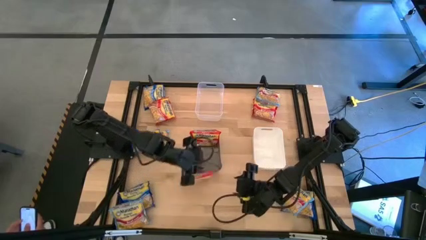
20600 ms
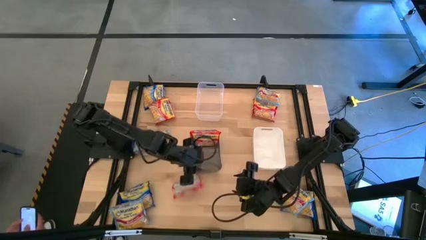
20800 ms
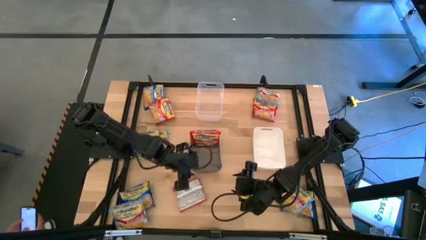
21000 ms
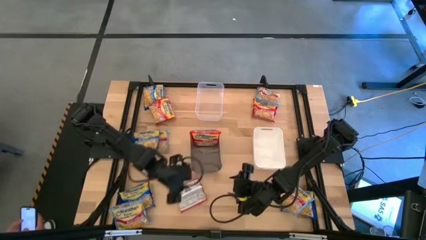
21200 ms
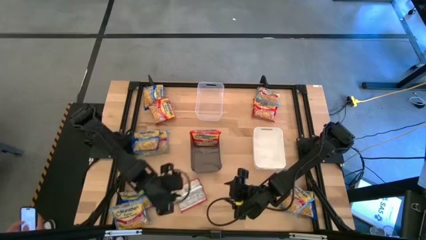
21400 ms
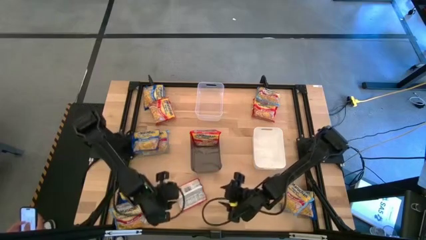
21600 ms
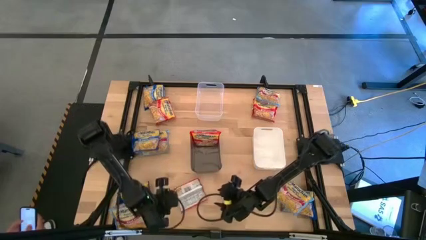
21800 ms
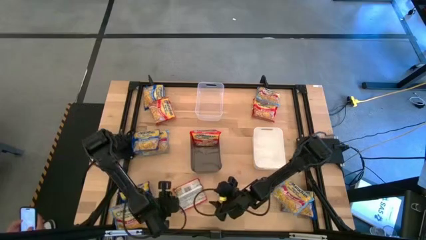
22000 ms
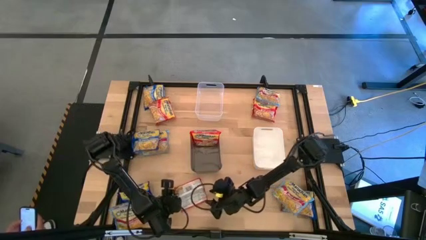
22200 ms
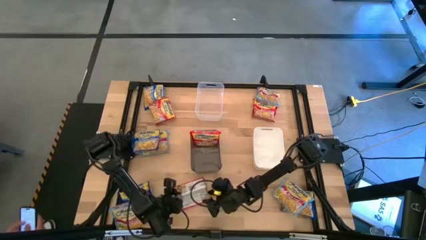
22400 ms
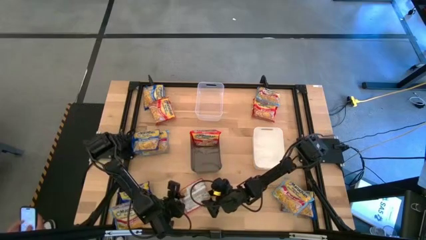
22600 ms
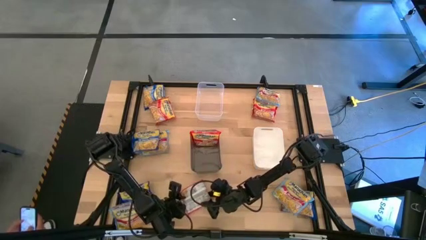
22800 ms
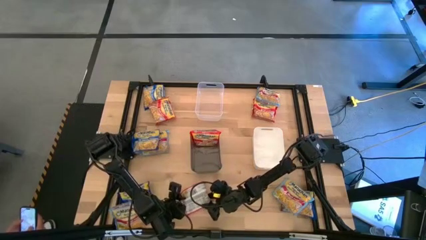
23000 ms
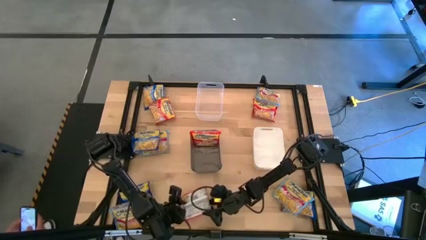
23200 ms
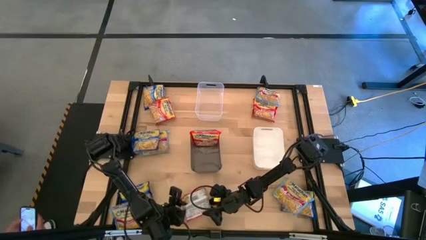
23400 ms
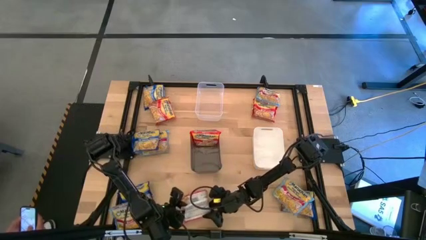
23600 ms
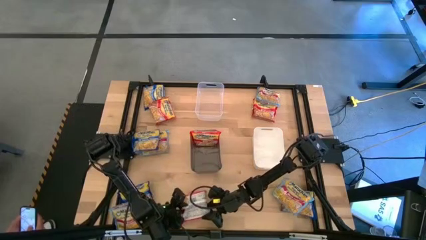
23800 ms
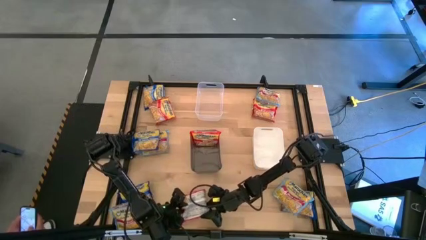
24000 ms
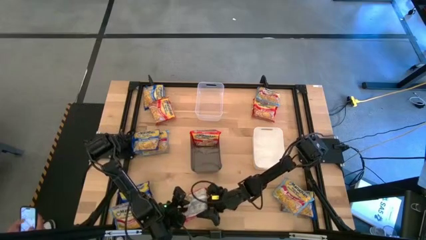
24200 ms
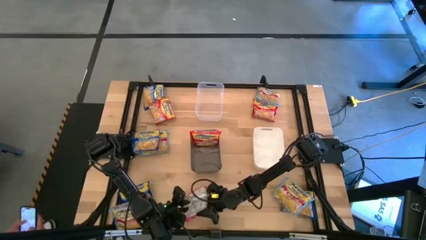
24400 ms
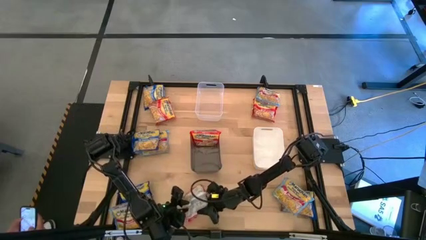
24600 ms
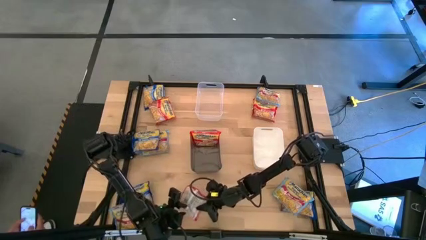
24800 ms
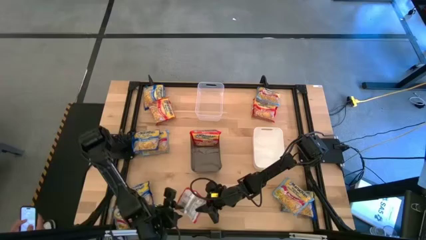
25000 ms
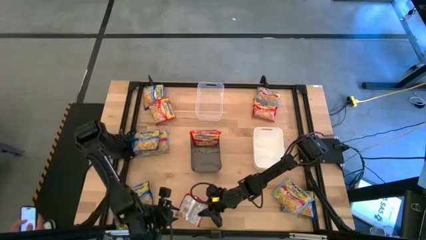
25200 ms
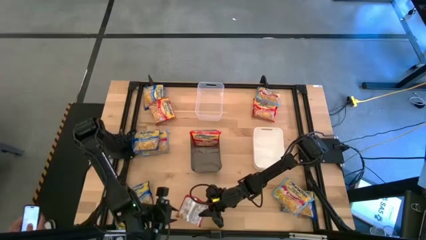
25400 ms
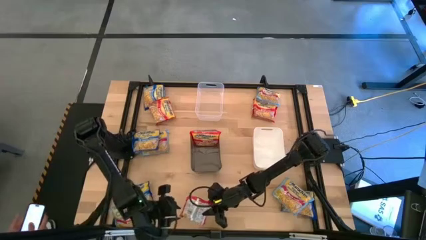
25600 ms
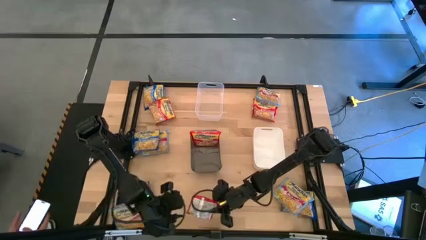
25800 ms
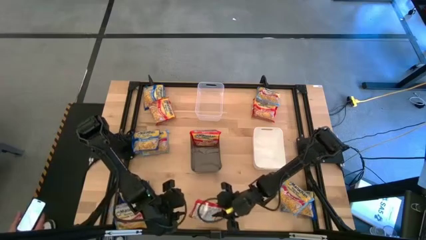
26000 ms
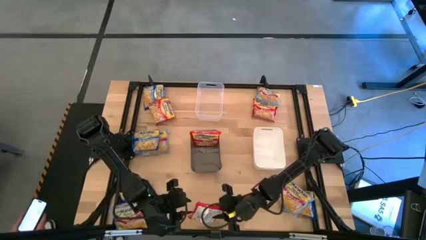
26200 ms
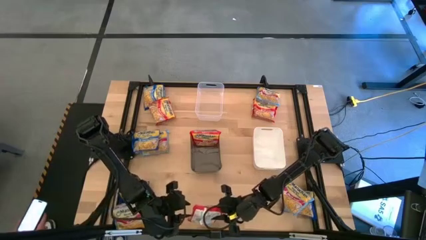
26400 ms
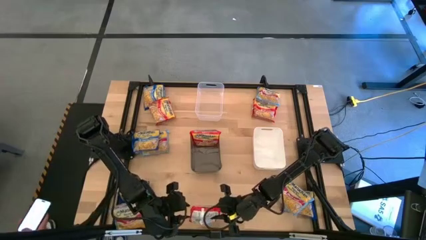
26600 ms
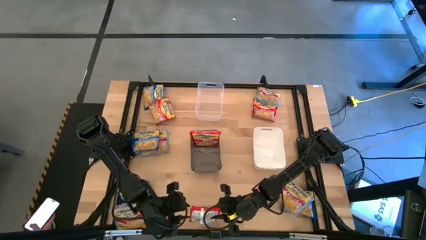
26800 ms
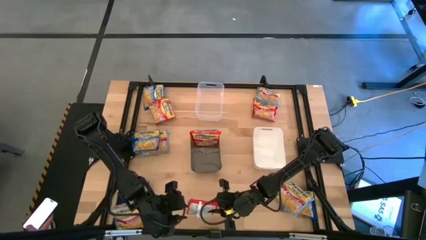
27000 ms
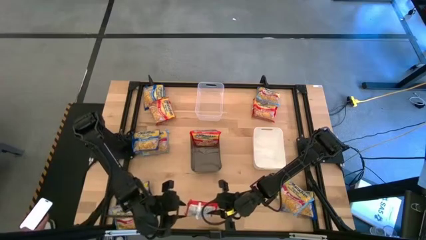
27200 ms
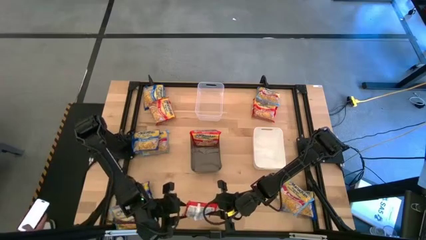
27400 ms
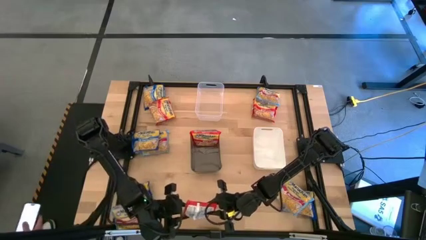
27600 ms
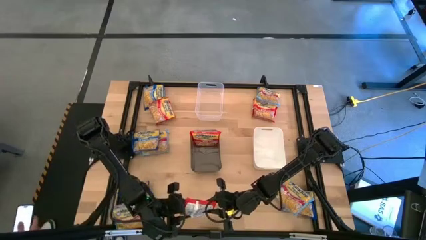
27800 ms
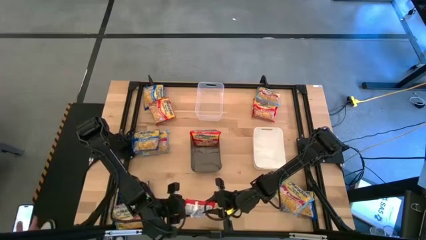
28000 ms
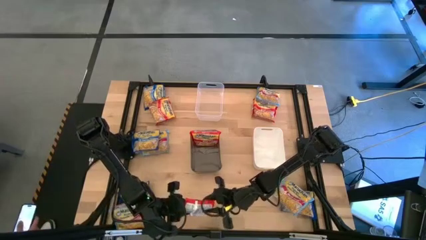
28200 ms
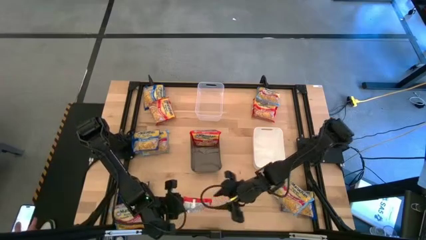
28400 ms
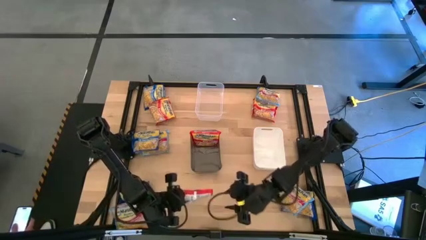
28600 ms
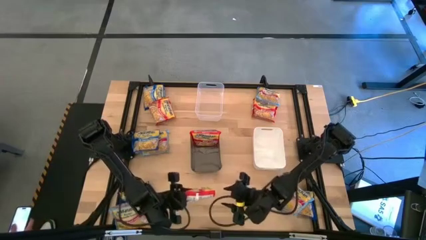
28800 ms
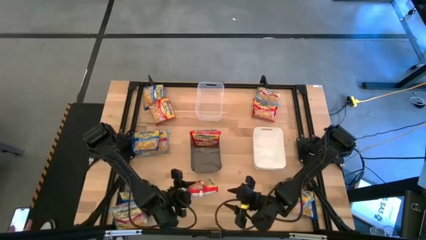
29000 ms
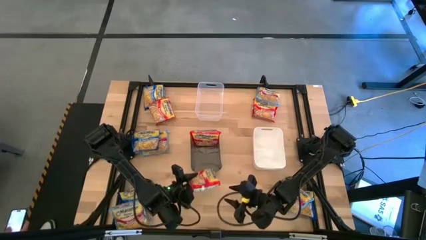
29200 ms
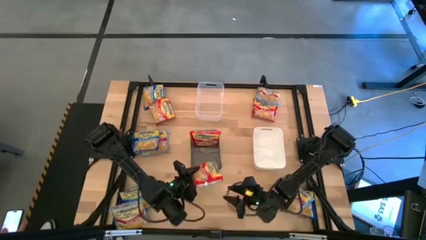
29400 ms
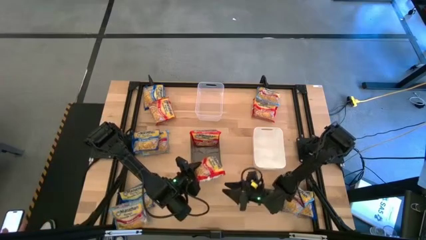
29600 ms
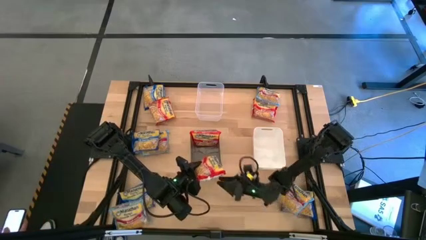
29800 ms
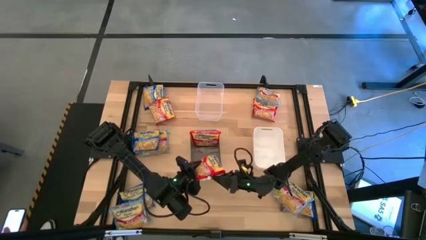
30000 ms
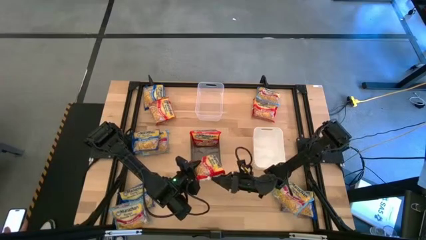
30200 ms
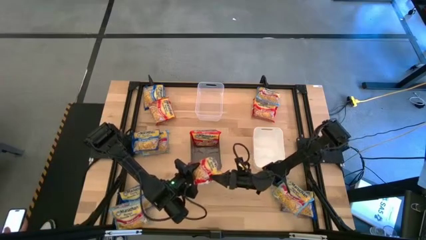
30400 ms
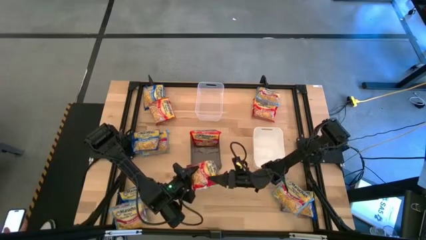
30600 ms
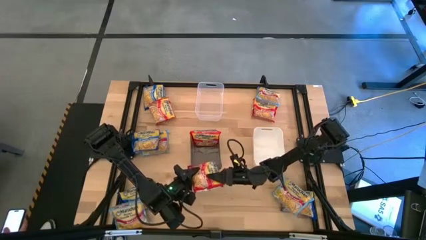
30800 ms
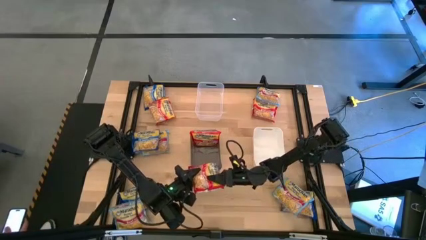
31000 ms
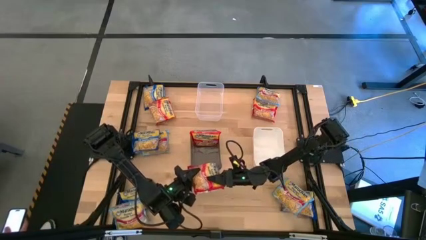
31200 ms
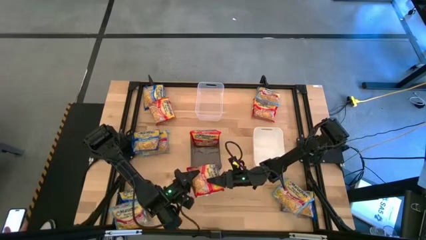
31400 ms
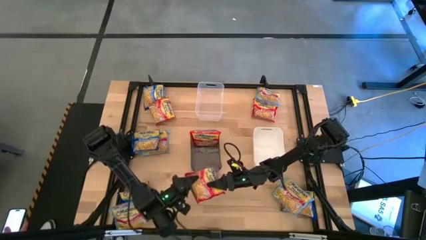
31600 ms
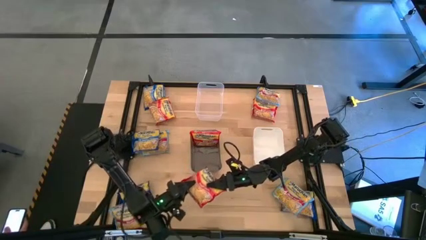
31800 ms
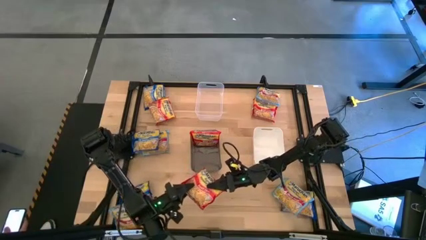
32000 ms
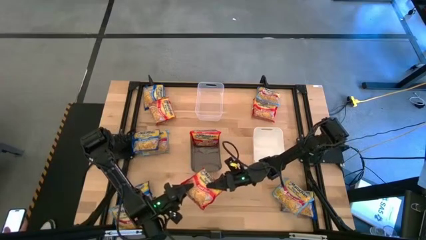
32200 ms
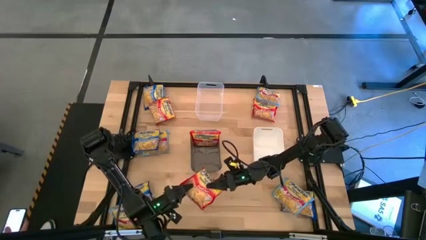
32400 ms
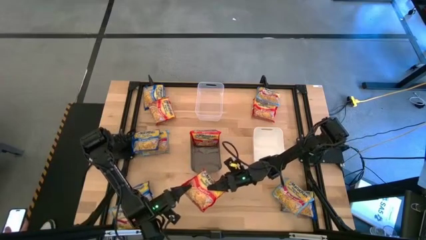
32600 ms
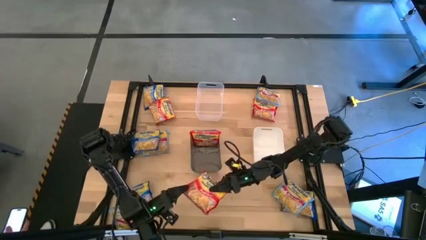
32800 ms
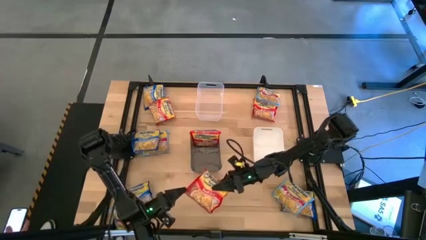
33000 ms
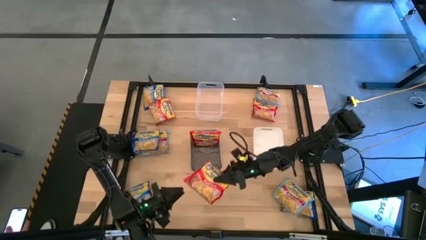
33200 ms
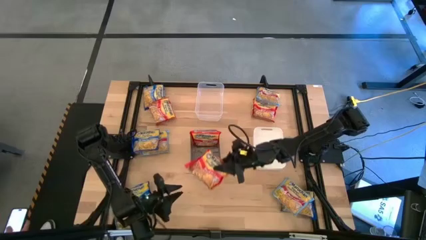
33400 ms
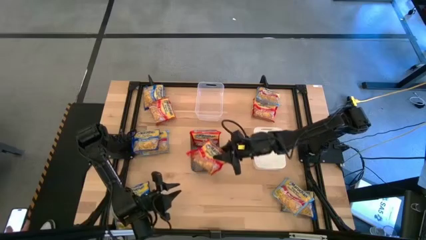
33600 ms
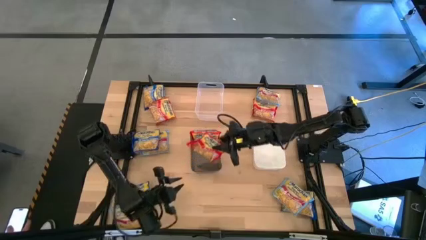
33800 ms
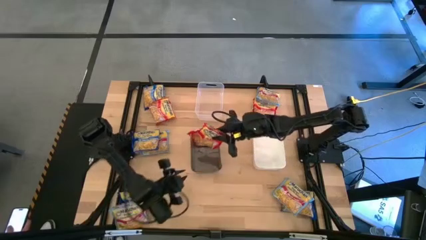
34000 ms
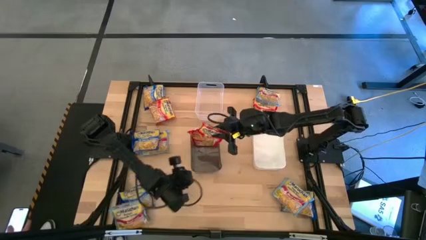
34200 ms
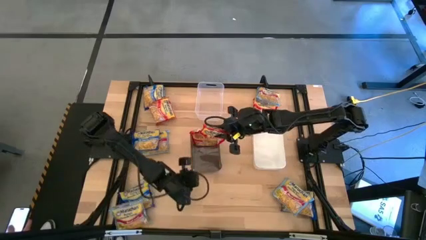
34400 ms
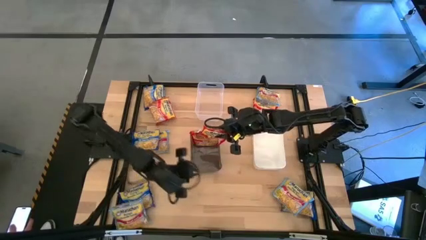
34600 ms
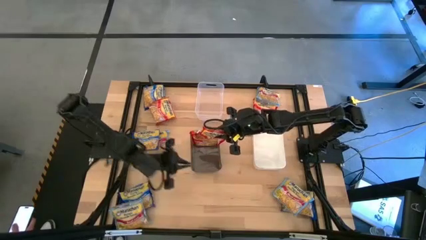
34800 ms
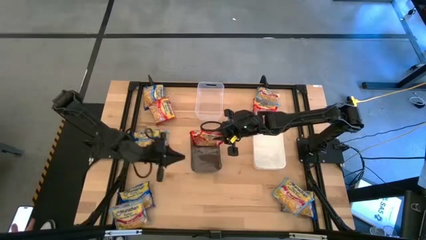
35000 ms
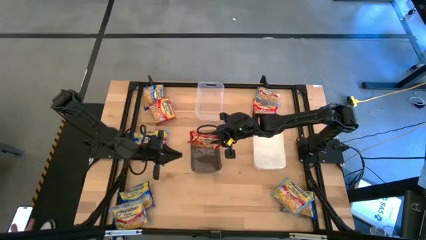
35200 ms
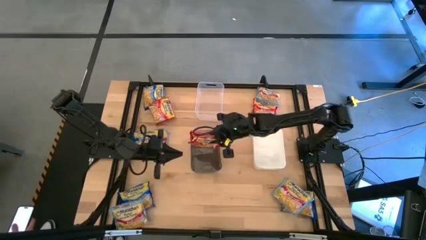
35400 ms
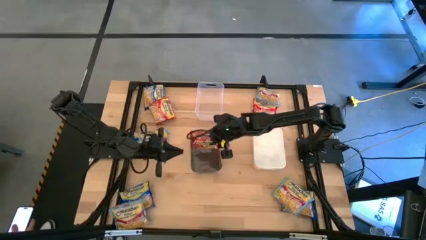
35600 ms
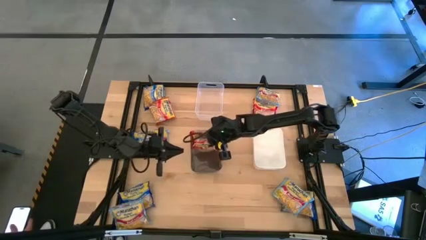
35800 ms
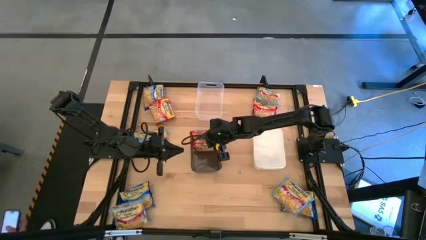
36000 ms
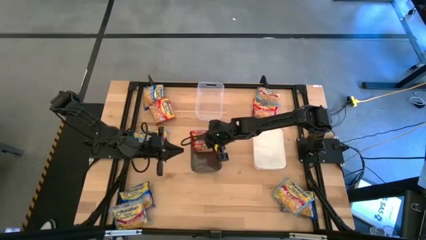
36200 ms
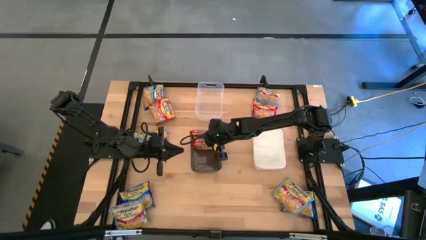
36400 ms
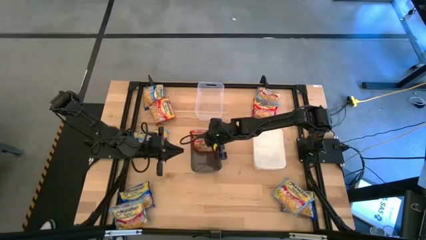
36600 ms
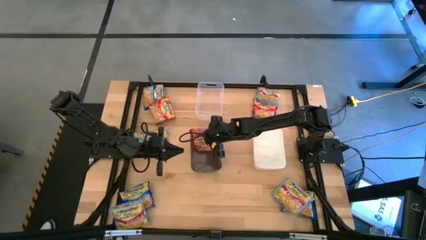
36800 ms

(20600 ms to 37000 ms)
Task: Sort Maruchan noodles
Put the red noodle pack into the gray bin
